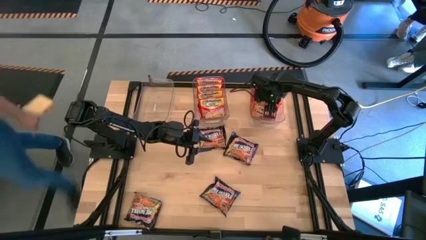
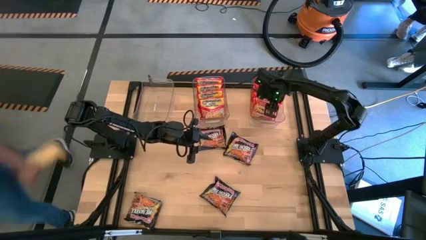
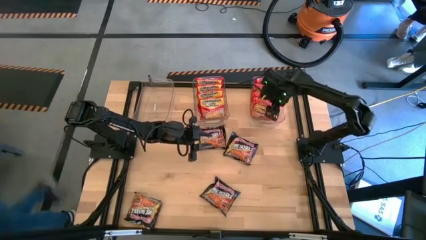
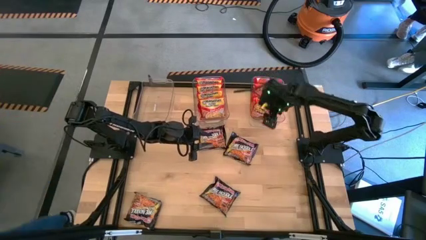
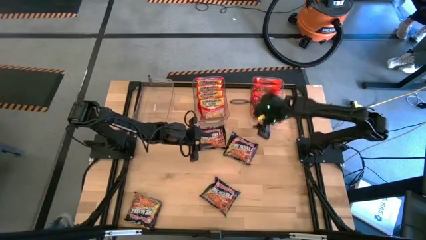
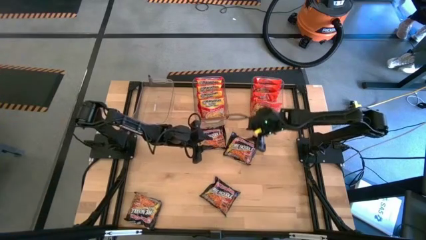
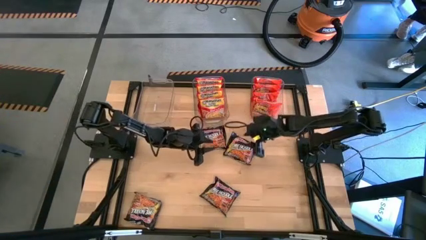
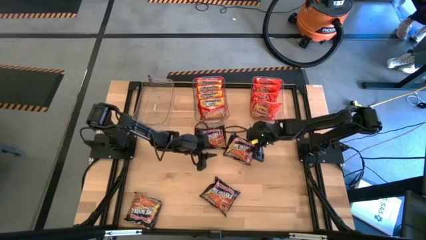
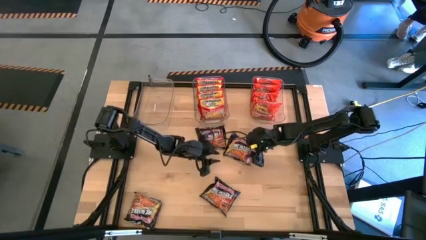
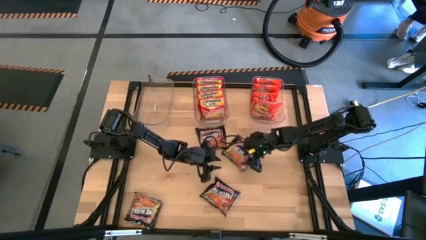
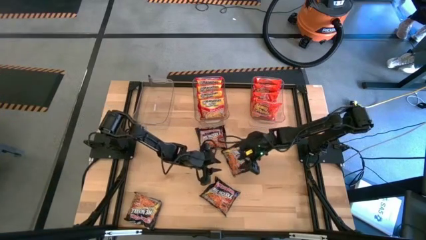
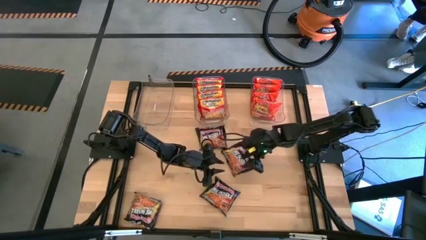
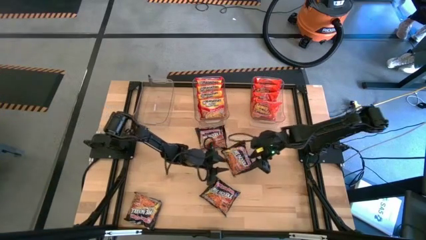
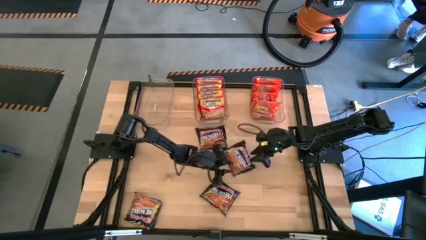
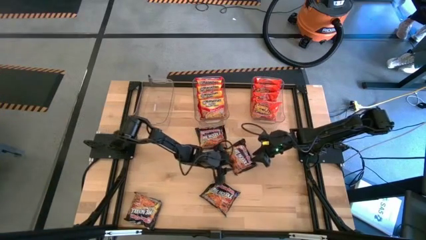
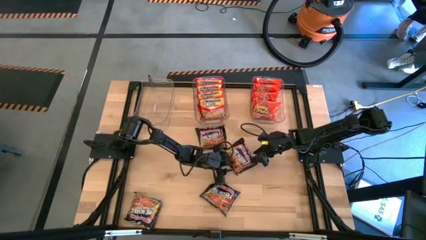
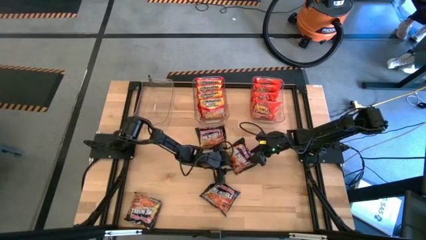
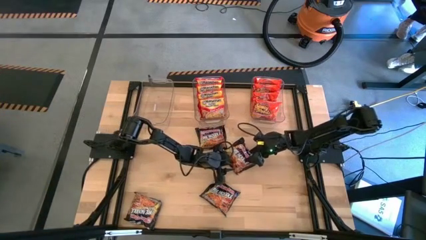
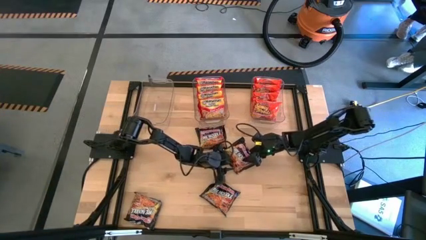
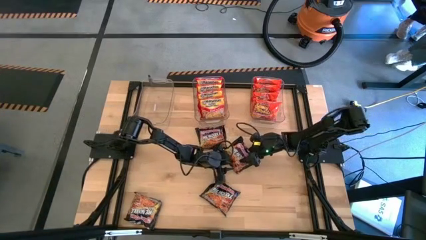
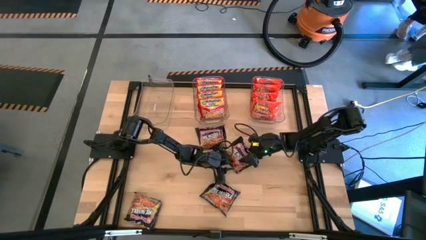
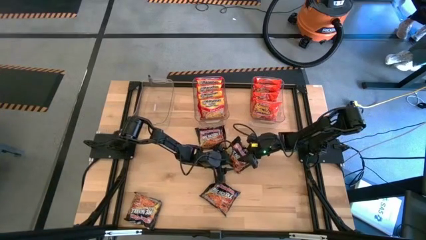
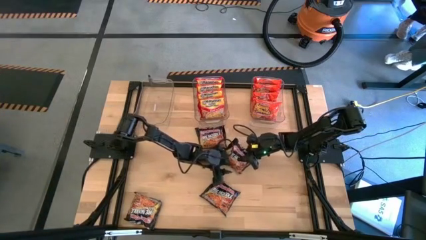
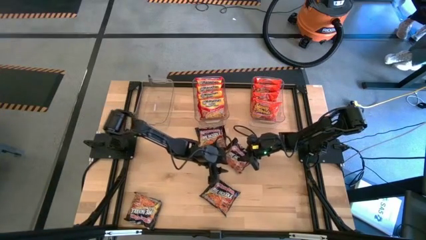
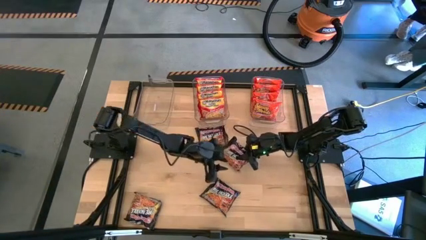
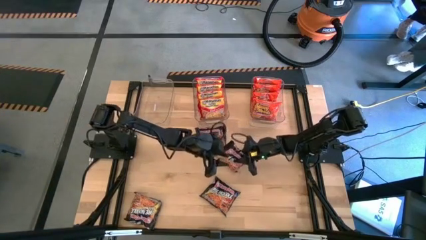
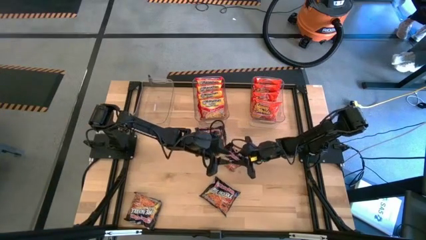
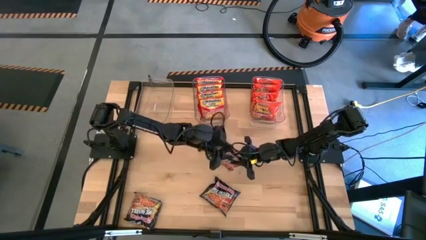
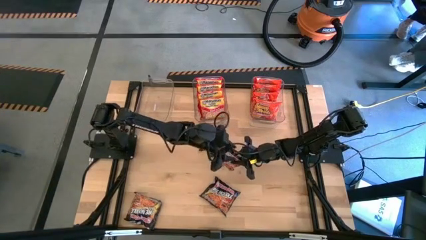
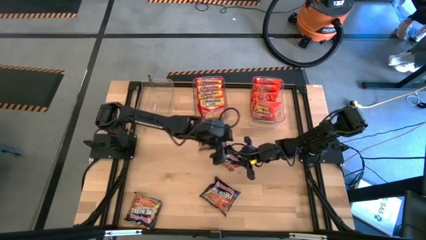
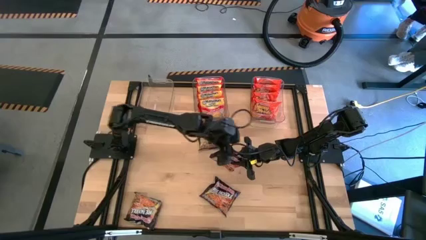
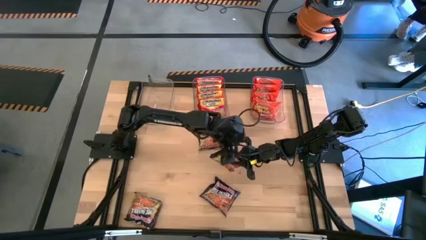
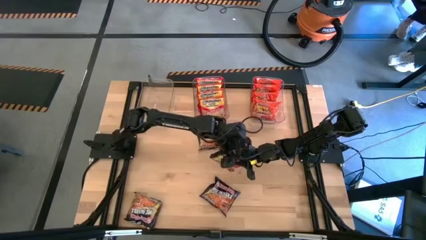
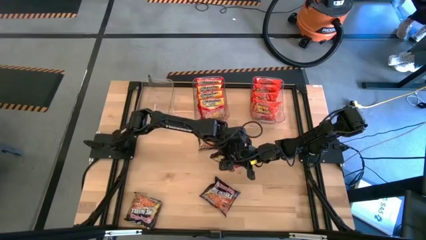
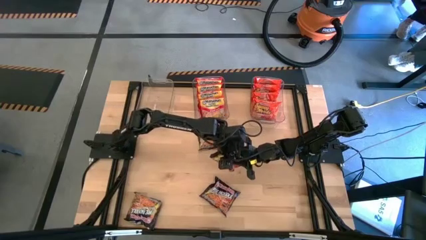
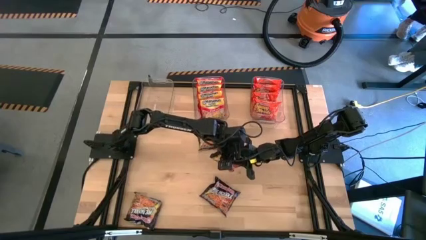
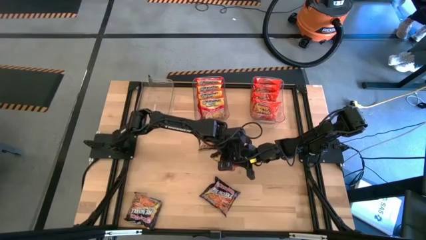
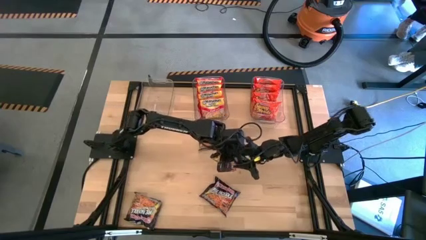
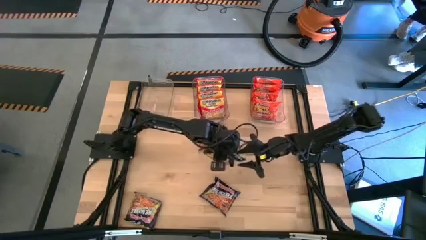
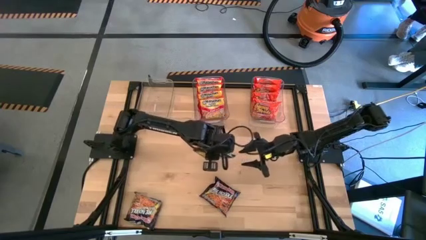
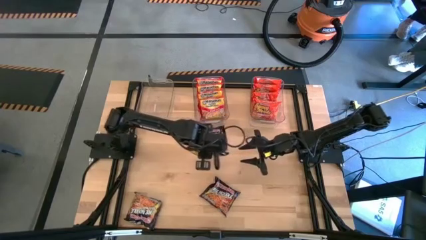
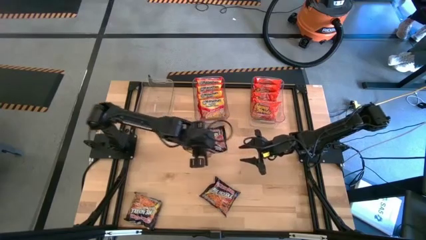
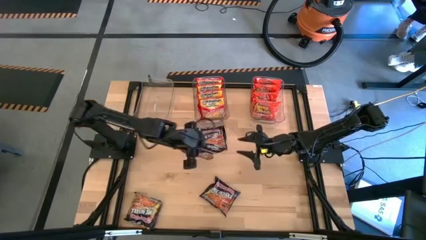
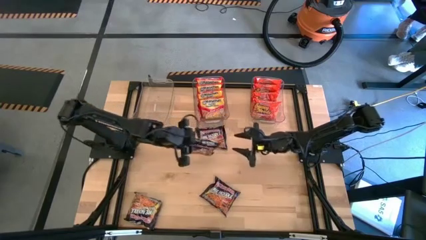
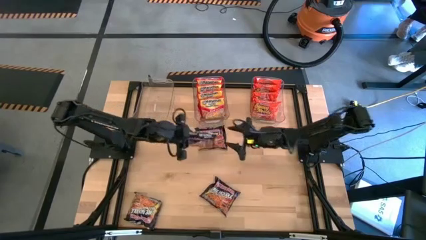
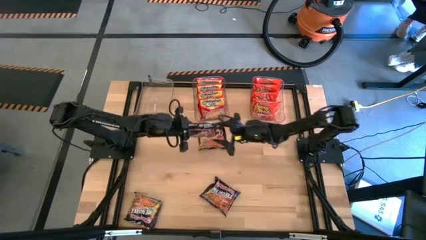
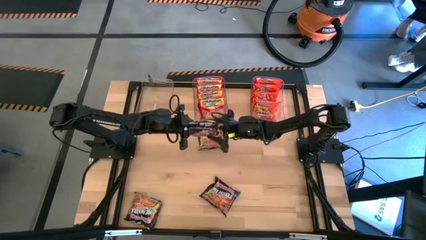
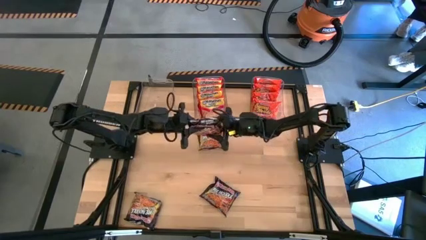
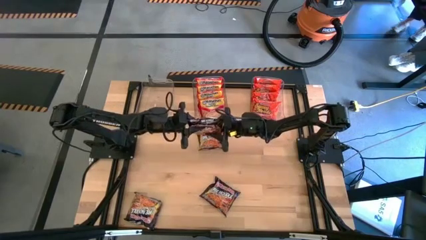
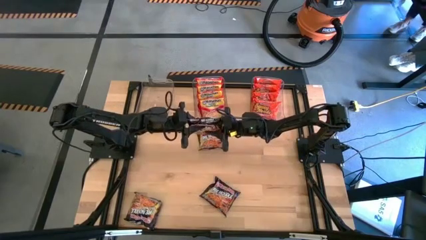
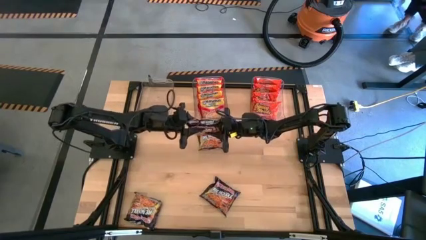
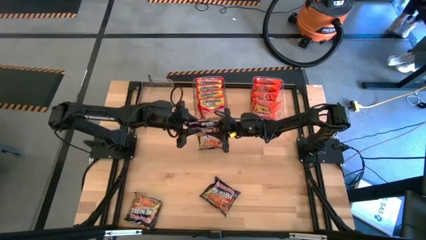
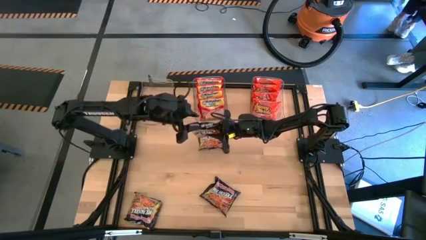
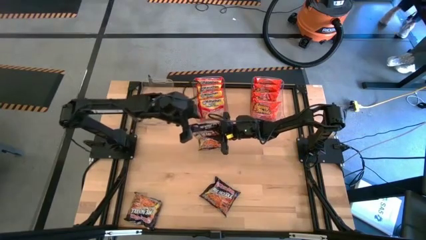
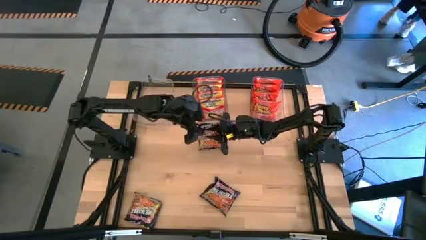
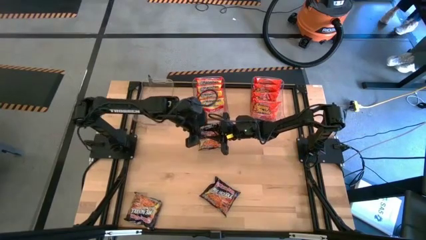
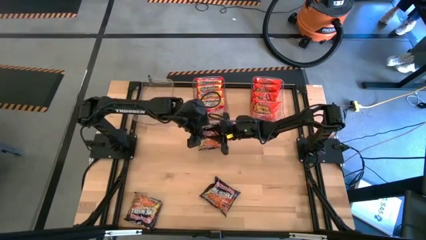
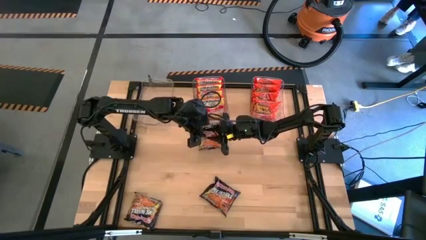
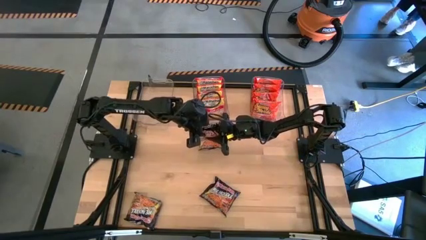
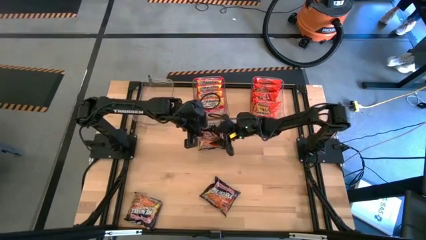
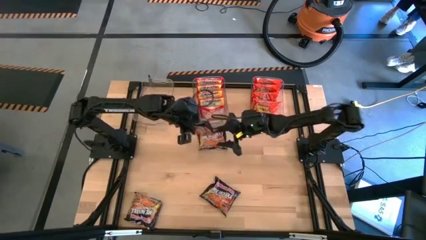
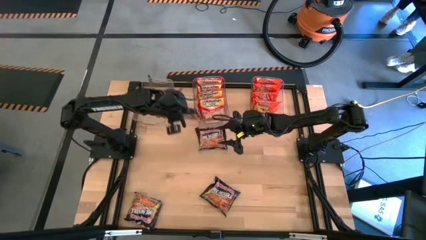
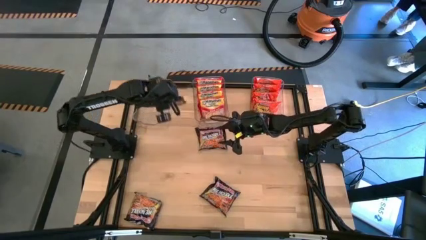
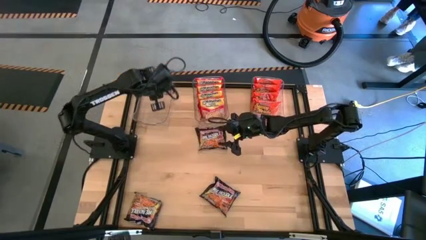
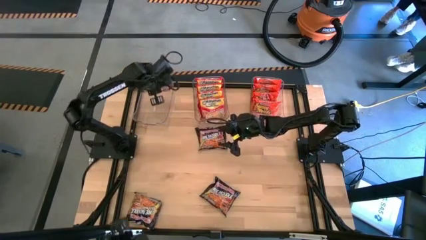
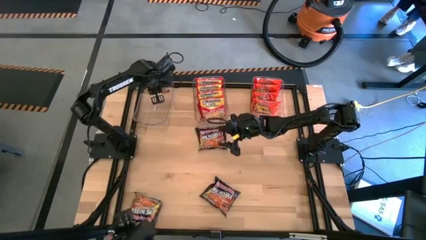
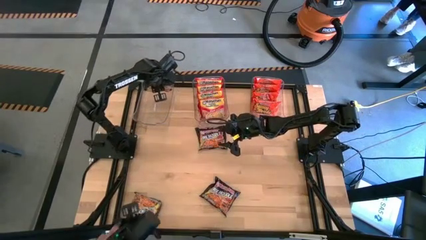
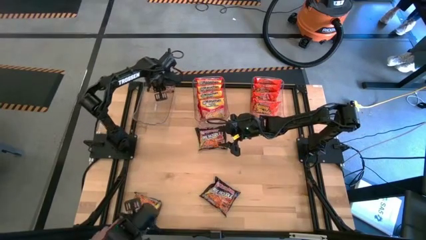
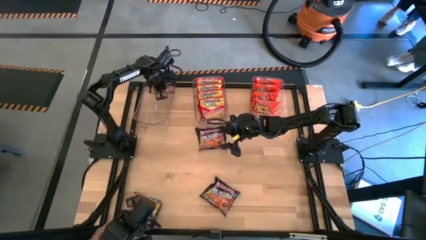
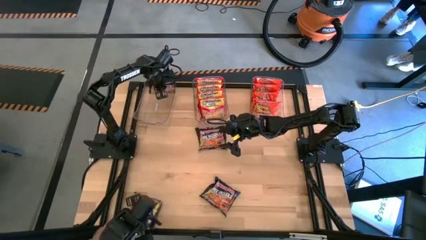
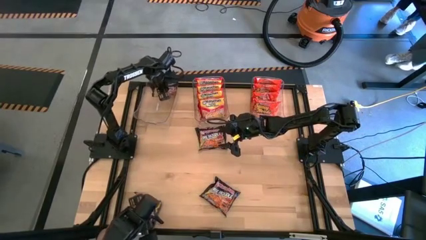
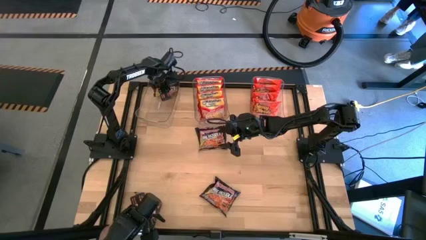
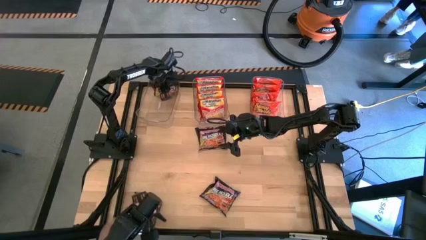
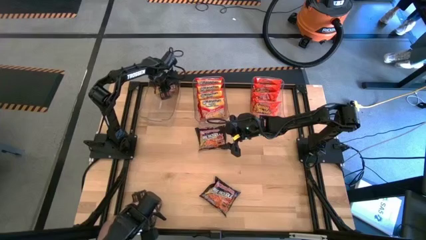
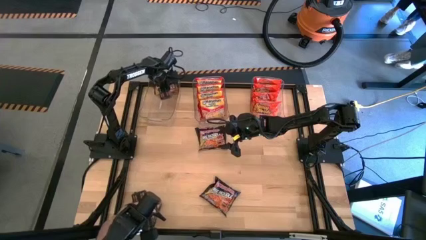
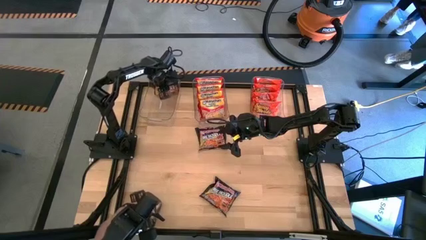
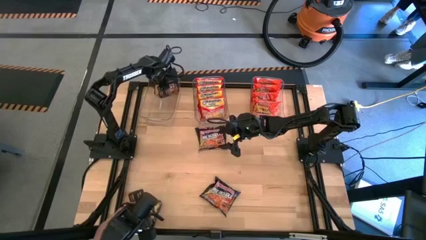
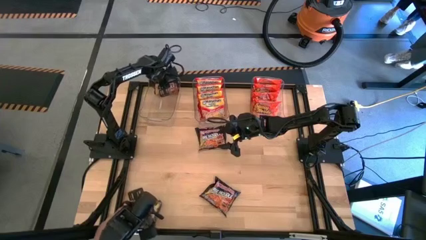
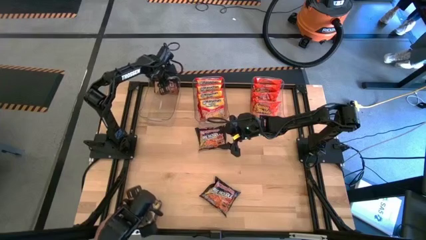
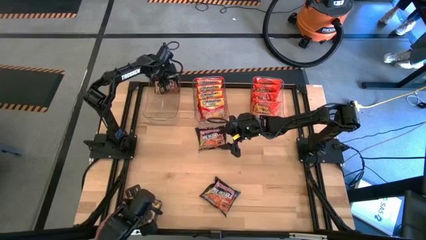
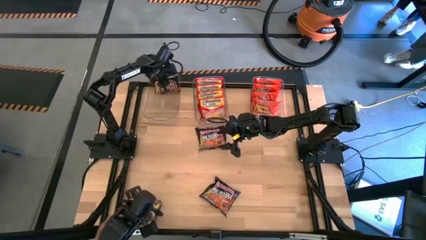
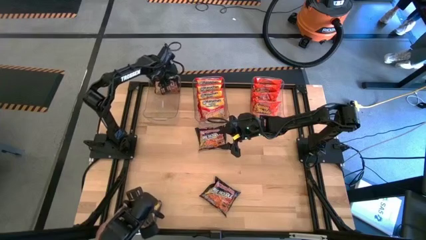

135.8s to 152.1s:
Task: Sort Maruchan noodles
Put the top right black noodle pack into the left transparent bin
